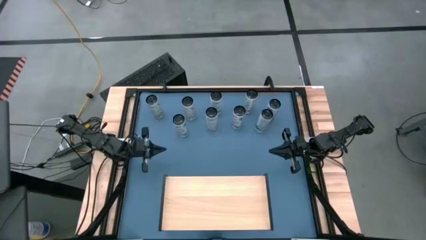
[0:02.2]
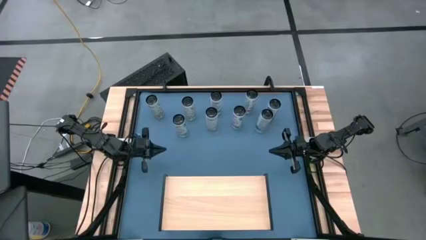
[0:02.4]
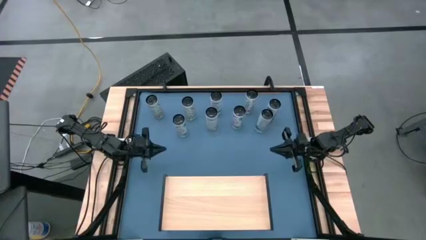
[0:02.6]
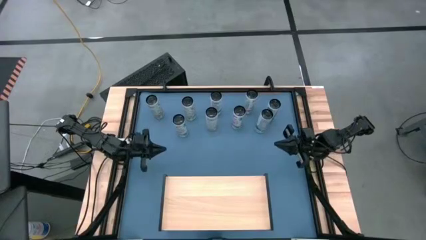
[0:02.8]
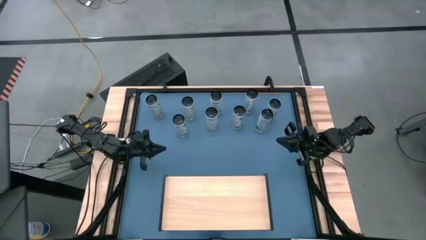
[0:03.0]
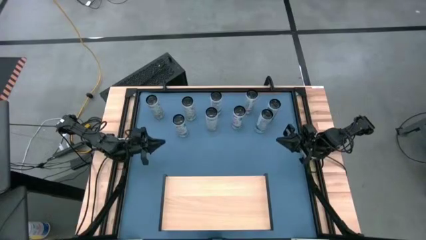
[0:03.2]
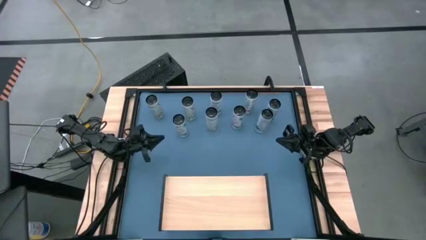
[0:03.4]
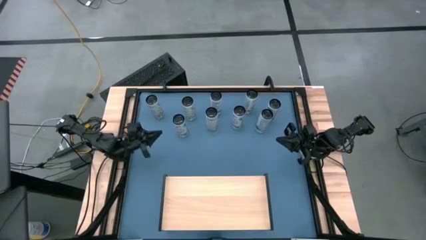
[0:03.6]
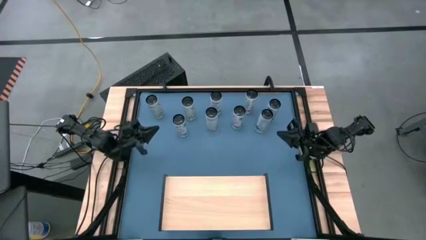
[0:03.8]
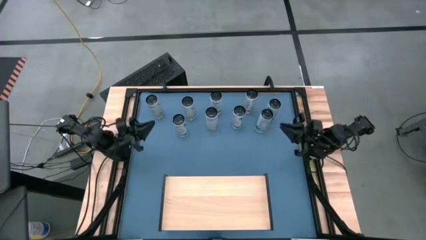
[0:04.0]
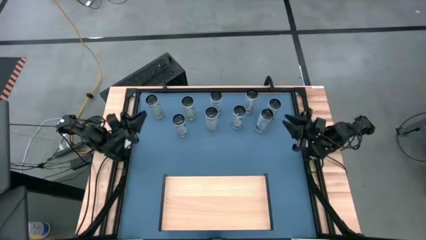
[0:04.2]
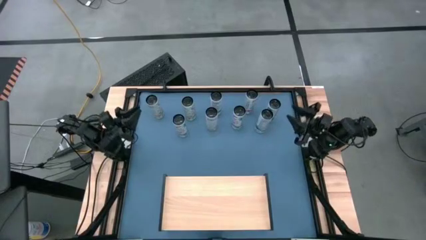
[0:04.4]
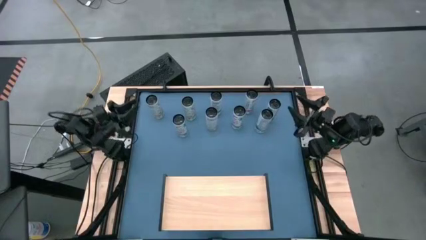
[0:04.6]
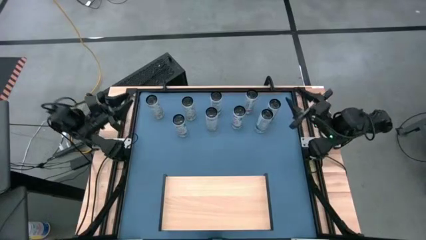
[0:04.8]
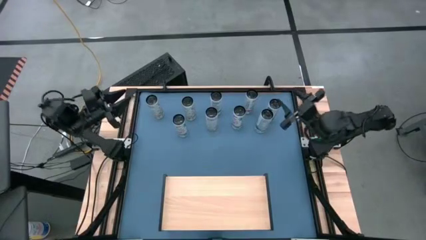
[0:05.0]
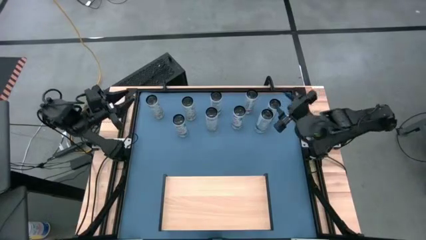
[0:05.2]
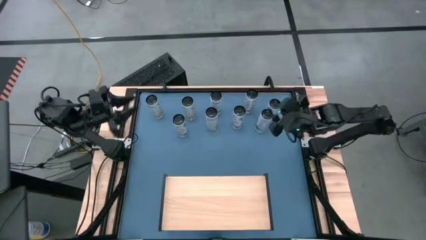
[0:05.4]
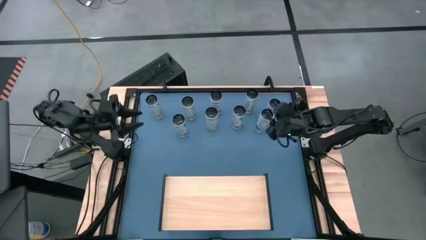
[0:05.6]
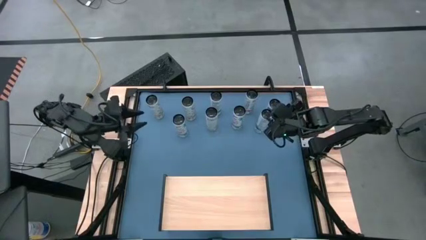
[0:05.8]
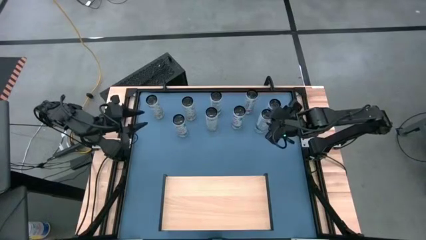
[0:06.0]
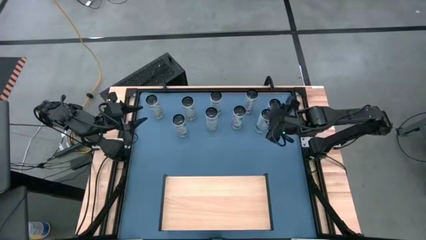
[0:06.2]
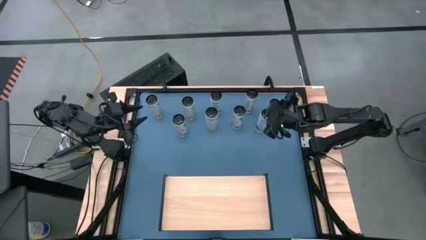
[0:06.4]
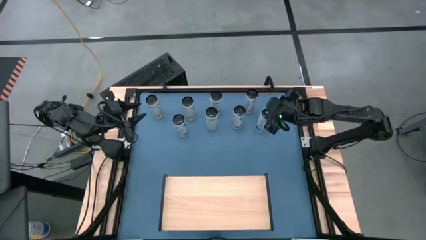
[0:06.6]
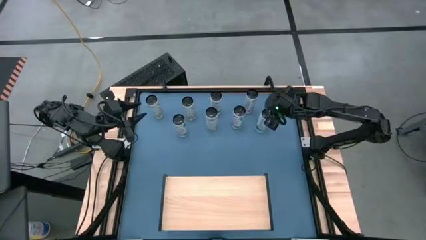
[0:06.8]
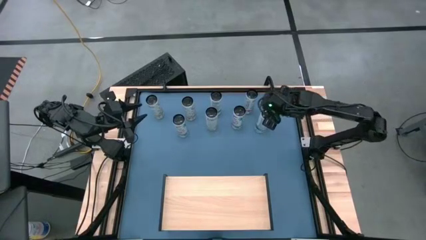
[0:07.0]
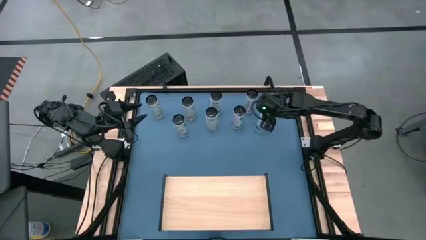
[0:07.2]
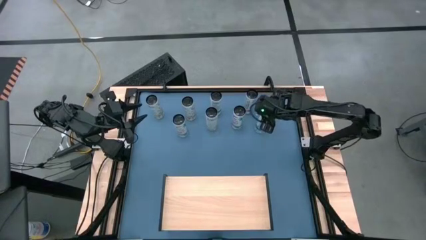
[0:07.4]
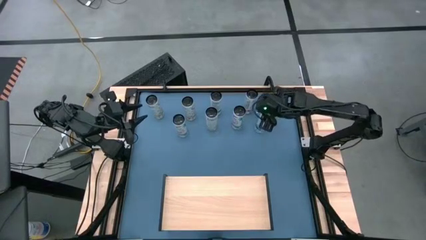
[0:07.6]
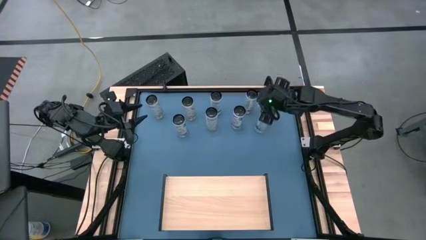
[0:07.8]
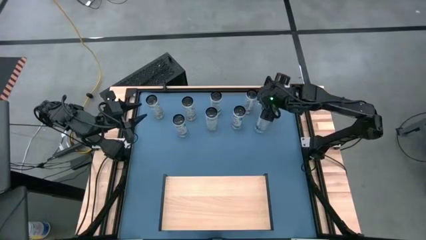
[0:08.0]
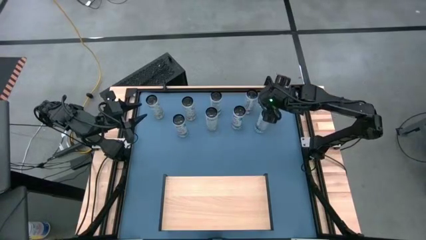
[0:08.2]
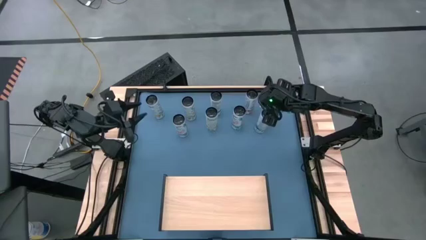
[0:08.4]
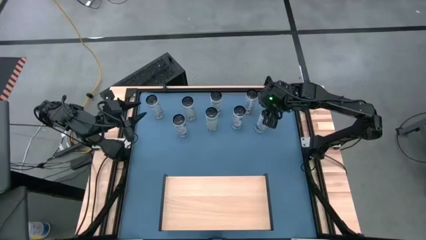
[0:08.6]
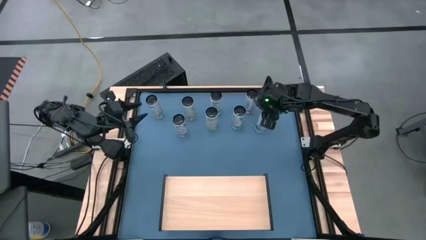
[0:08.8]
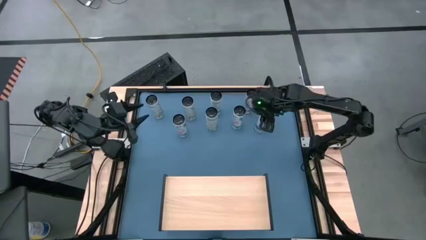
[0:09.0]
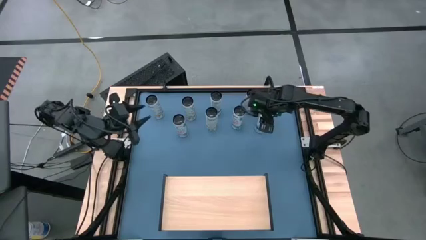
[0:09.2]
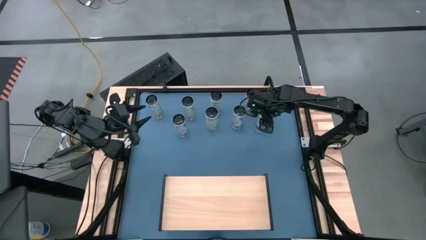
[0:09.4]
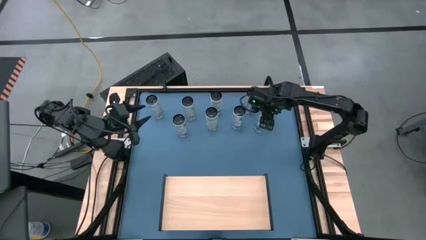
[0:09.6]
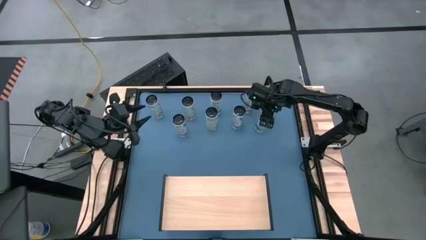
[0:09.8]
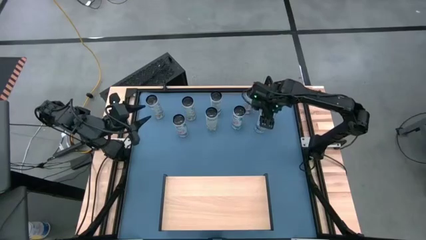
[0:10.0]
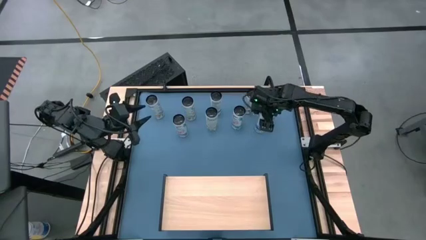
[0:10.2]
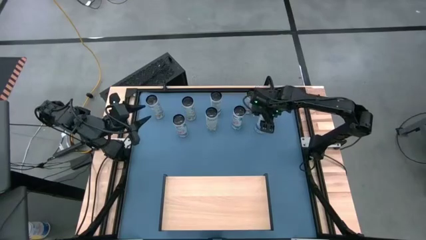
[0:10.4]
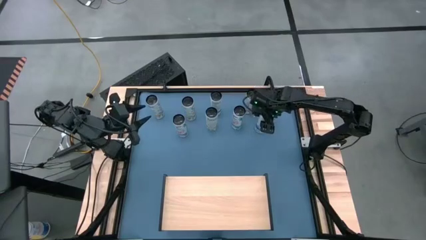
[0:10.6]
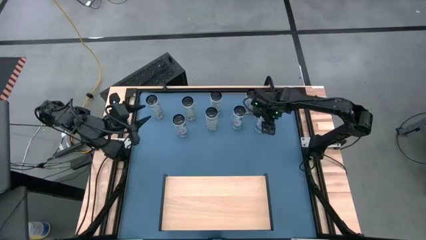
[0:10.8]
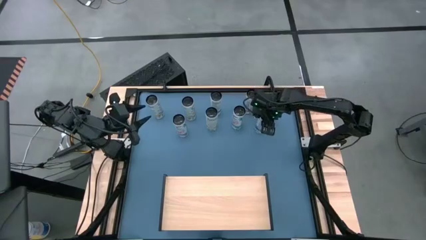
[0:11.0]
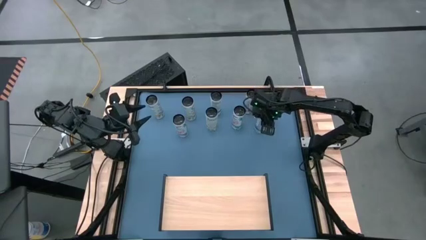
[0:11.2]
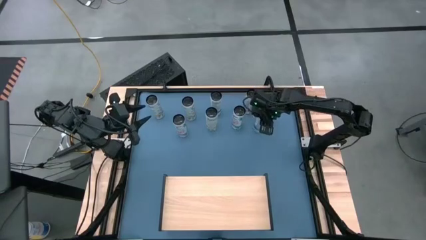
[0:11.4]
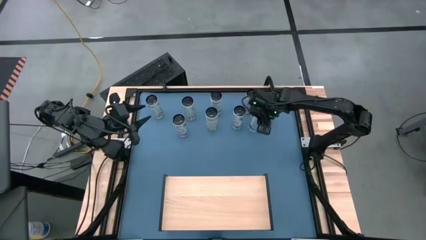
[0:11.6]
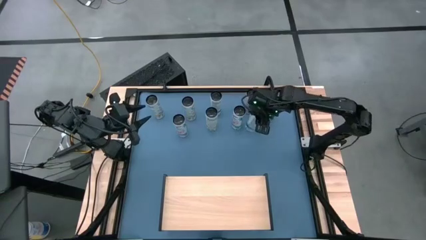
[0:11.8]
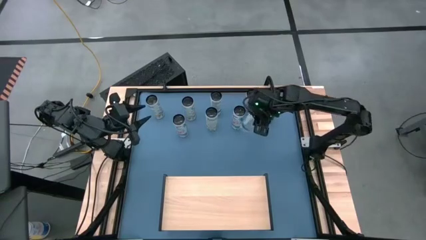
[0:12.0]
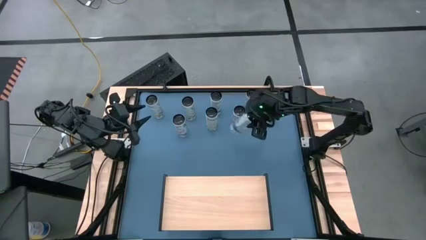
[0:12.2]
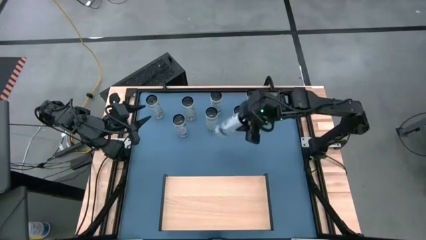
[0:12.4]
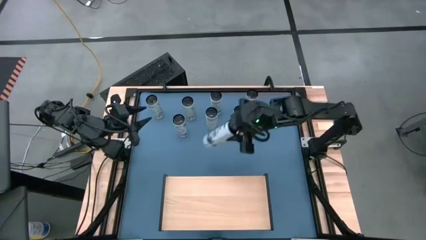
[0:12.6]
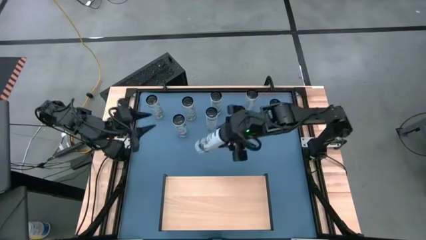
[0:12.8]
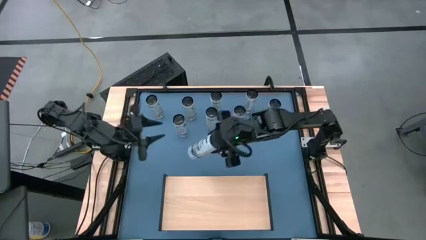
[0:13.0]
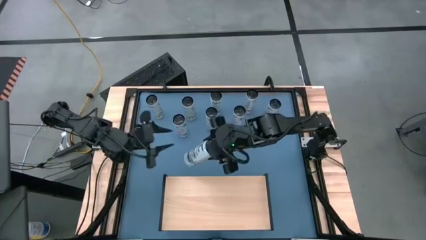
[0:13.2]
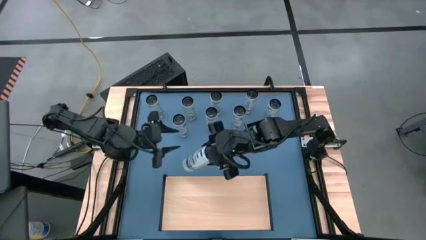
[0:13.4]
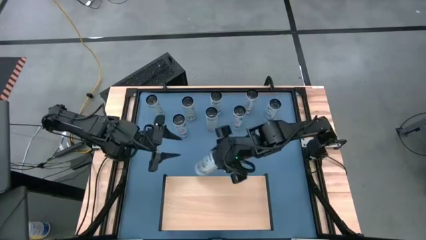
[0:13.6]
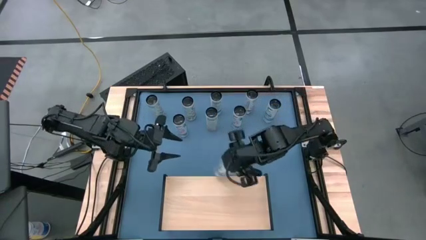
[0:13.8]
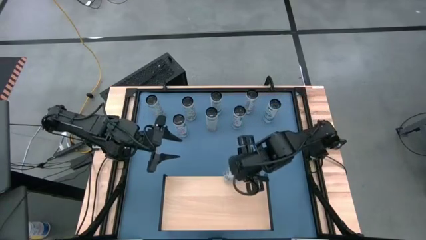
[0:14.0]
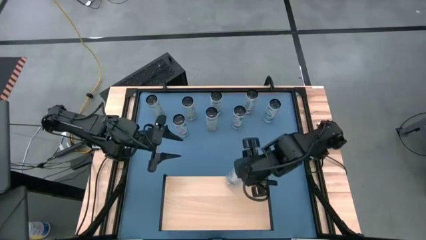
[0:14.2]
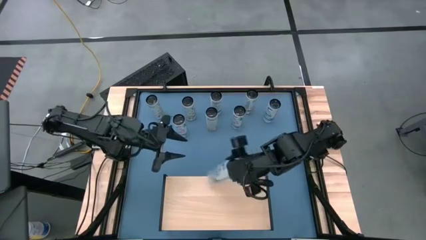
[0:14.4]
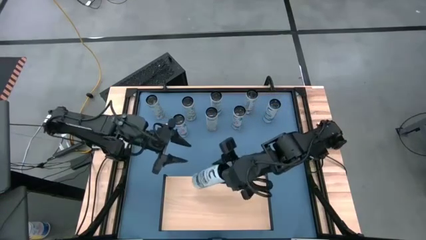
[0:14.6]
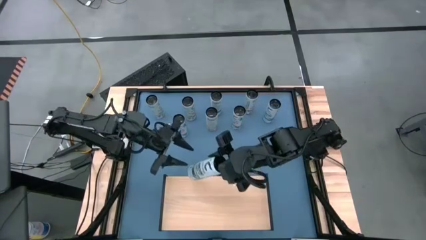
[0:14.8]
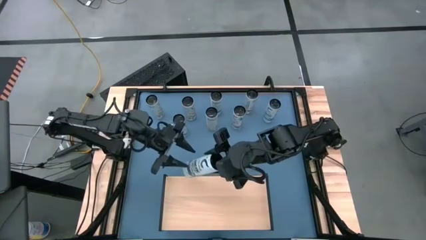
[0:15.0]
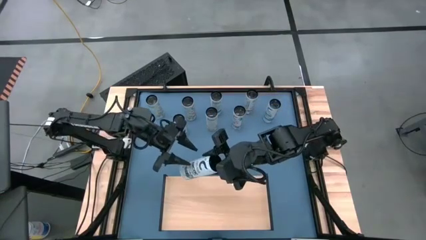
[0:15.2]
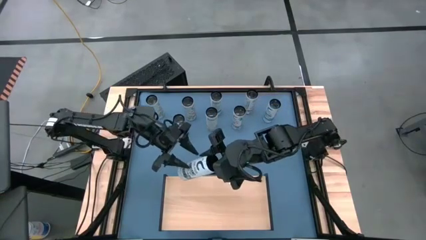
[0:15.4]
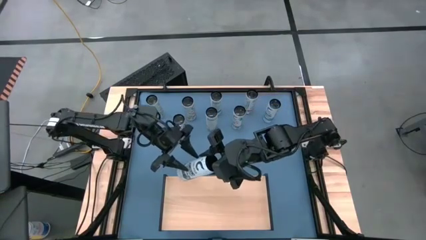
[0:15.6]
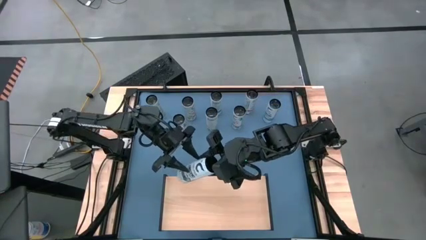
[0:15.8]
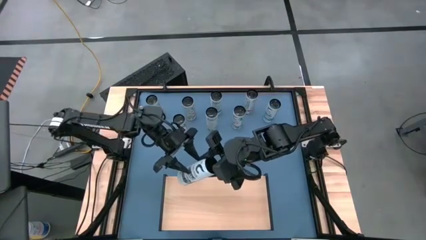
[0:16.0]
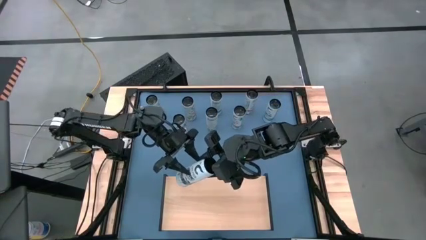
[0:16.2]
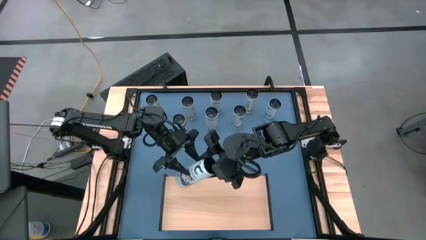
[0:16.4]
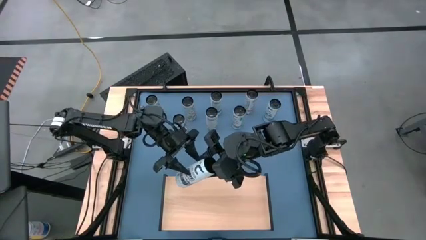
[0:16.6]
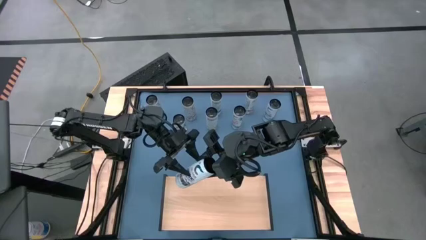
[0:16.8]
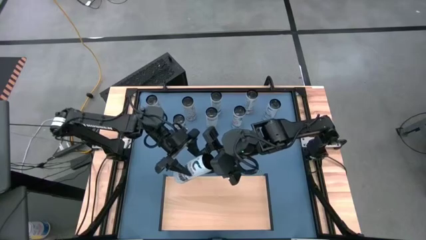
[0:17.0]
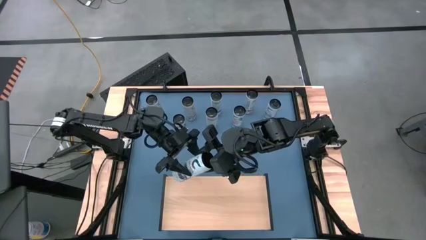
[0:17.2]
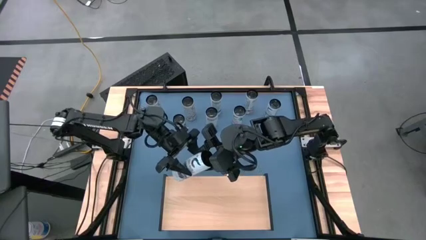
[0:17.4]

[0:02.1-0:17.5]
Task: Place canned beverage on shelf
Put the bottom right white blue soda can on the shelf
